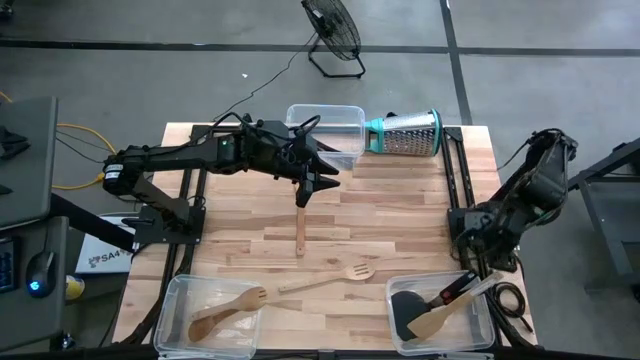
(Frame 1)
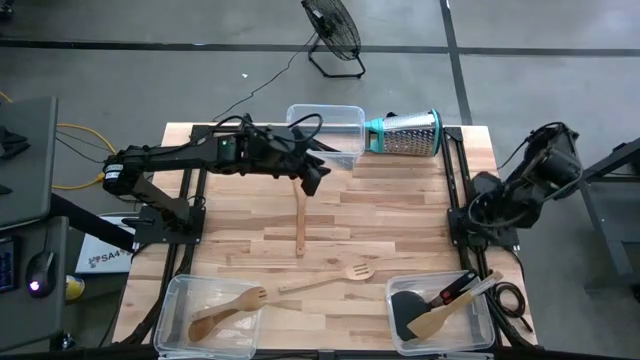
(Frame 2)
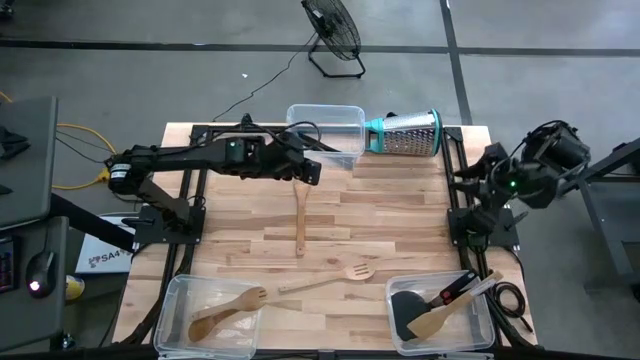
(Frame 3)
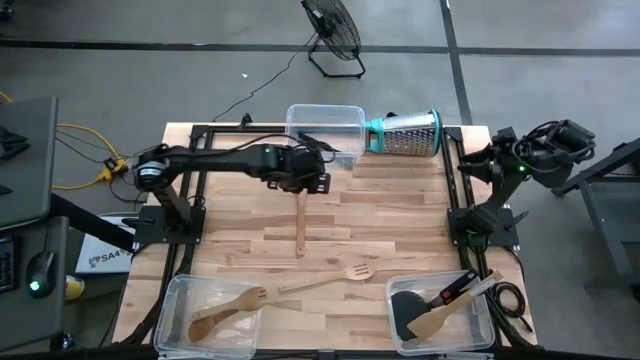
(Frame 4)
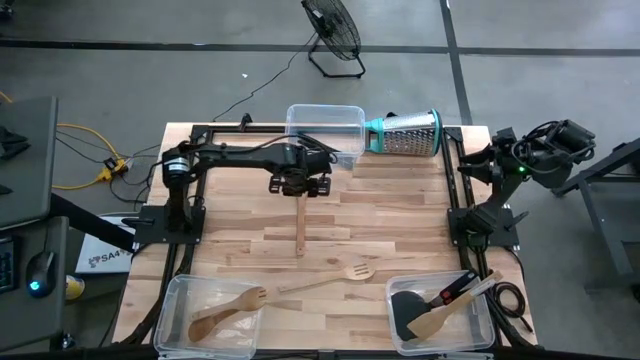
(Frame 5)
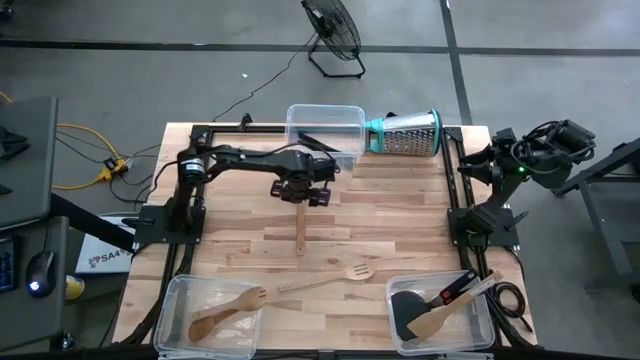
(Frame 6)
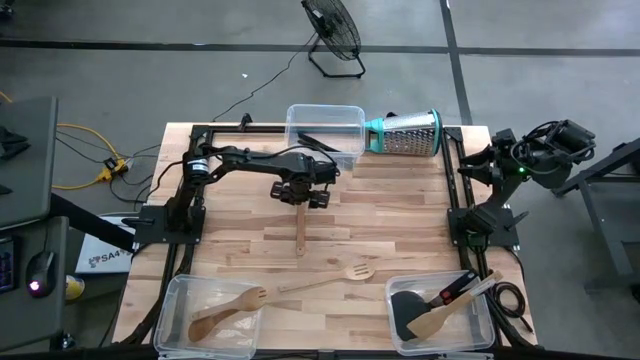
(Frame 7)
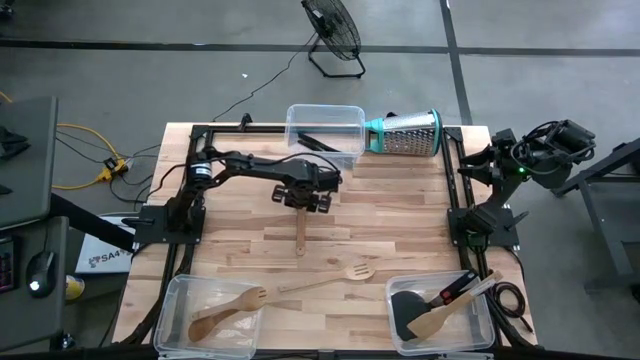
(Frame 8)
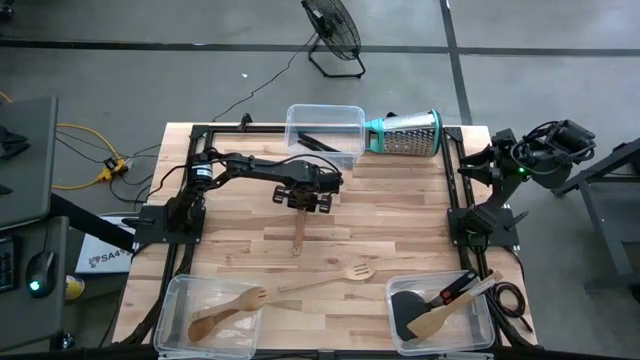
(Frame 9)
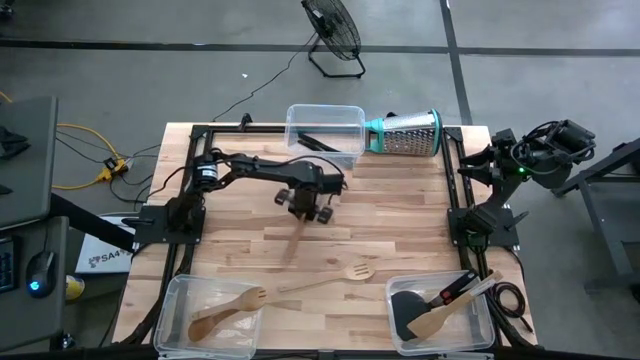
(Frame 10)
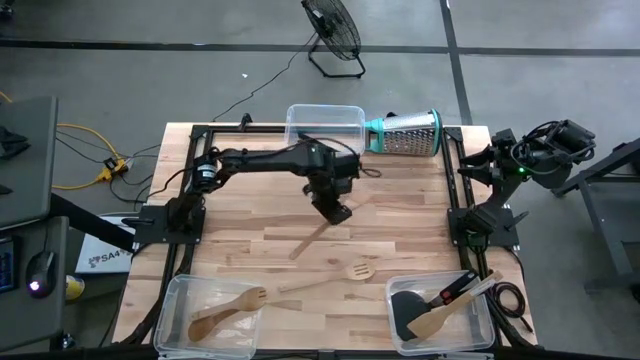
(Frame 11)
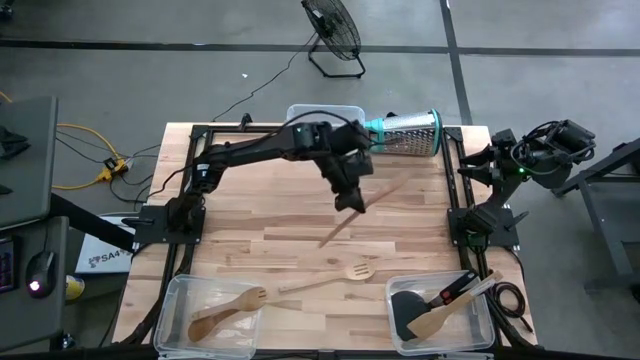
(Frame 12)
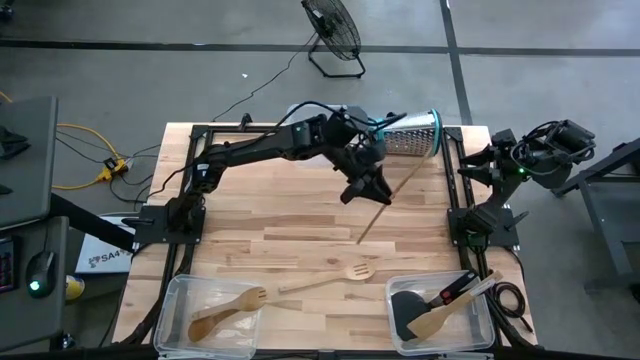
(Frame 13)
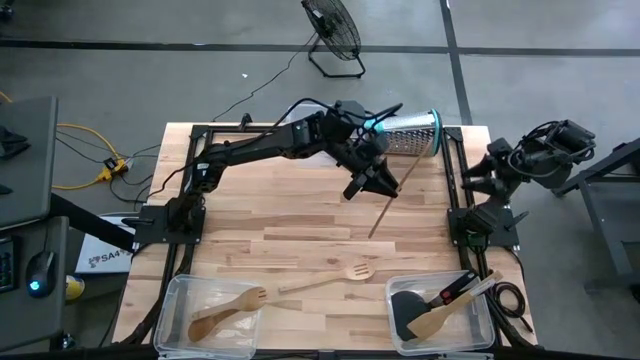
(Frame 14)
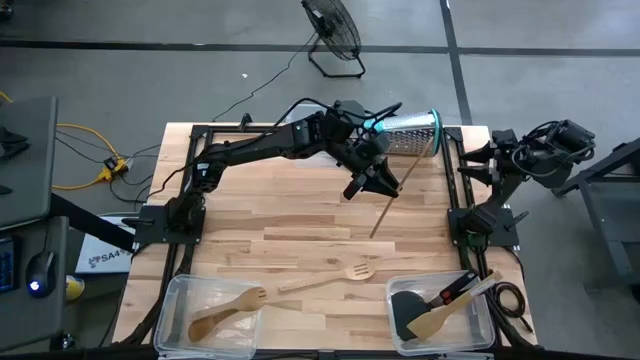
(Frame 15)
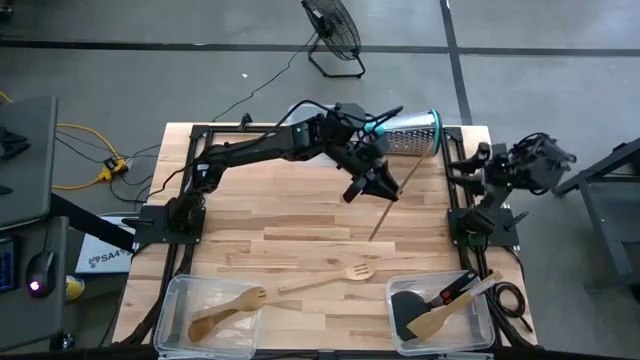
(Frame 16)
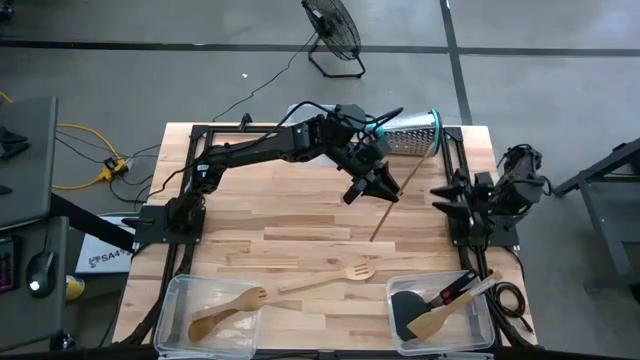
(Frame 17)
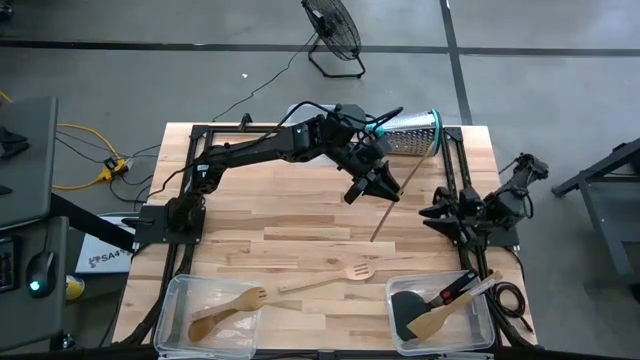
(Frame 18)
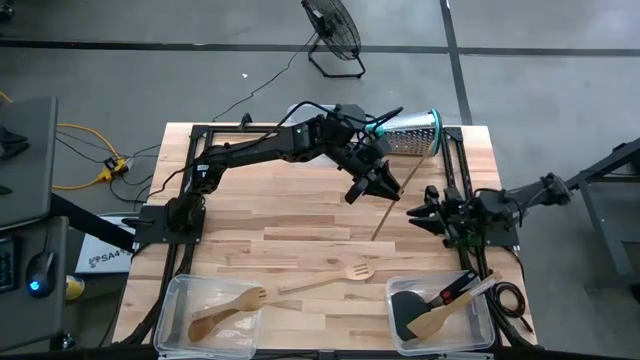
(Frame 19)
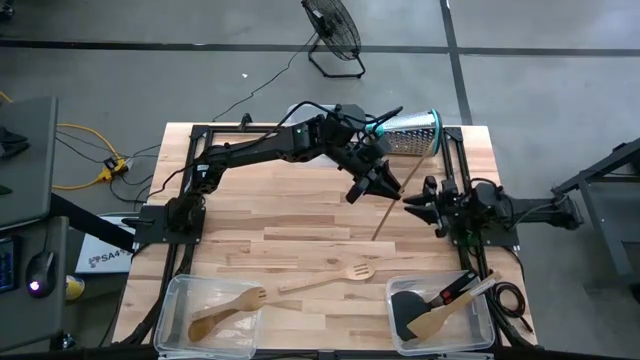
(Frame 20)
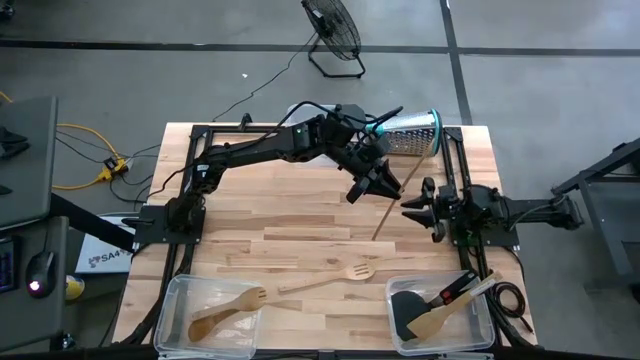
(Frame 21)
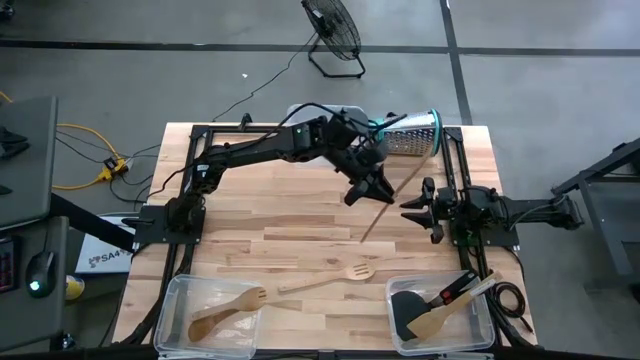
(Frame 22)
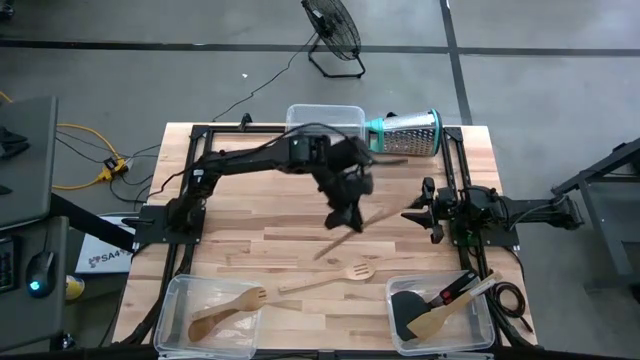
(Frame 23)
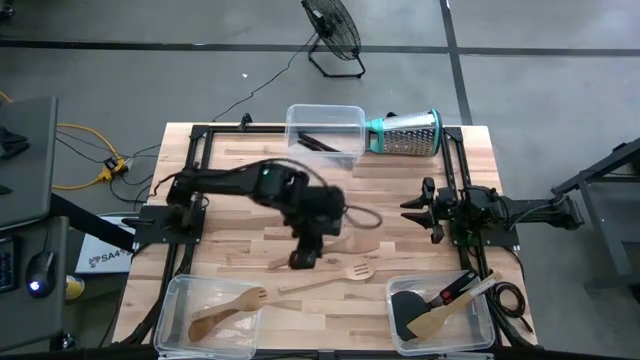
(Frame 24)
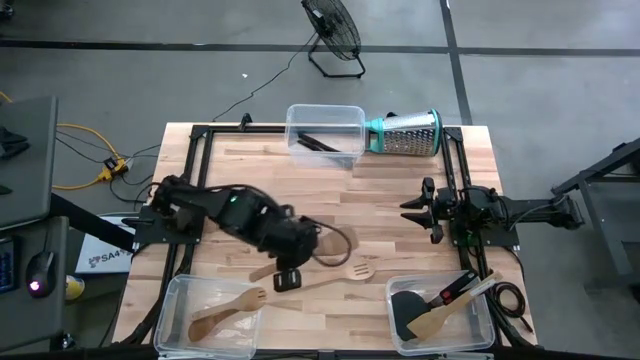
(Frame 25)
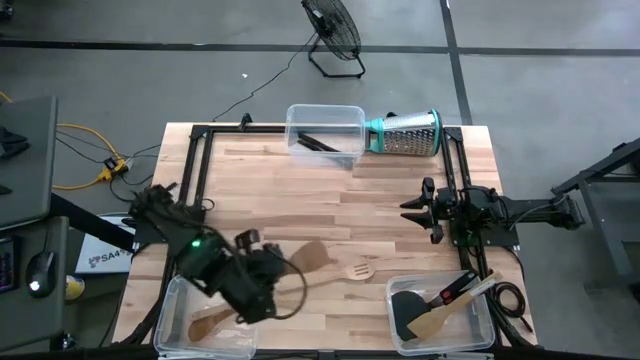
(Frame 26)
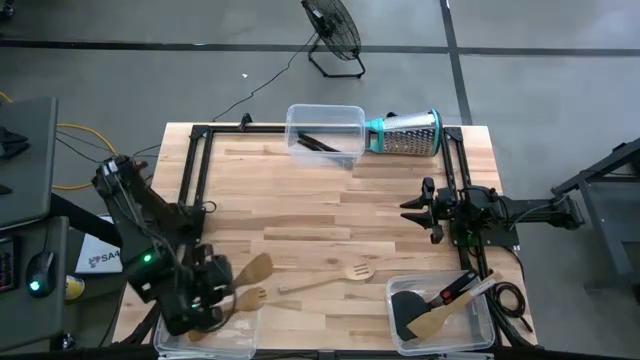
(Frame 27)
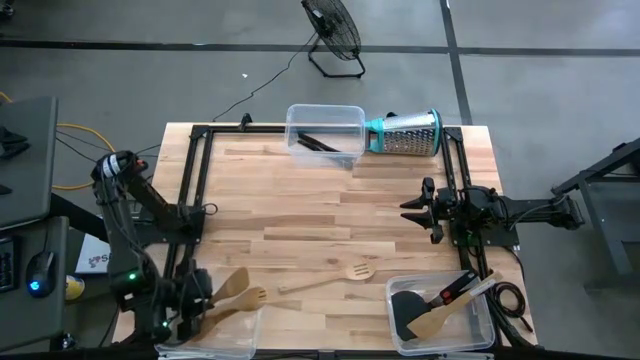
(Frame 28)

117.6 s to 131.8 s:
Task: Pick & Place Kitchen Items
Put the brown serving spoon into the bottom left transparent bin

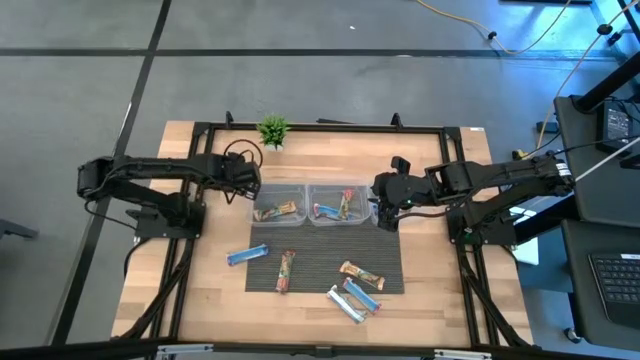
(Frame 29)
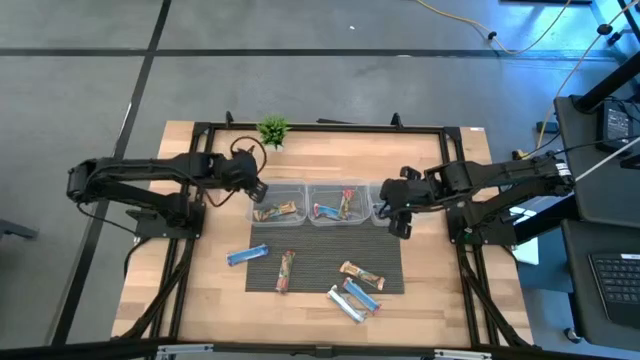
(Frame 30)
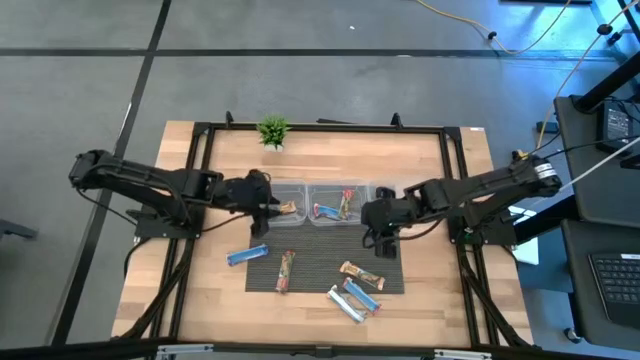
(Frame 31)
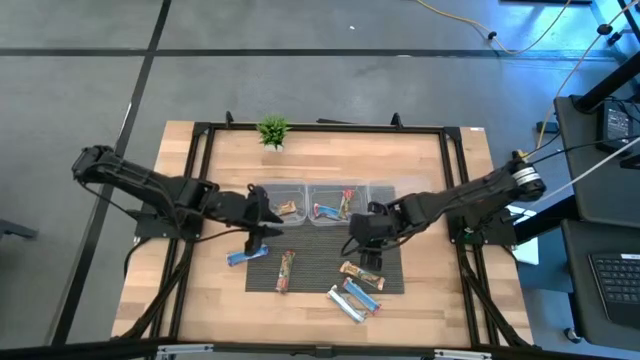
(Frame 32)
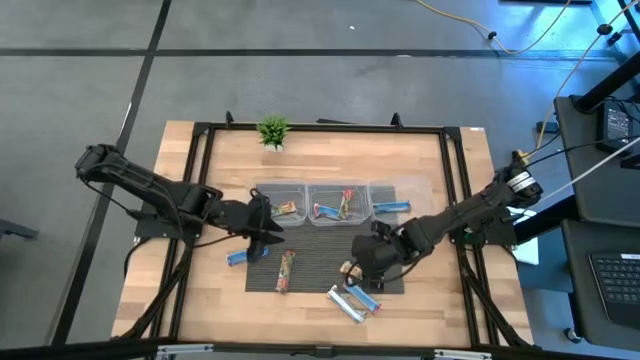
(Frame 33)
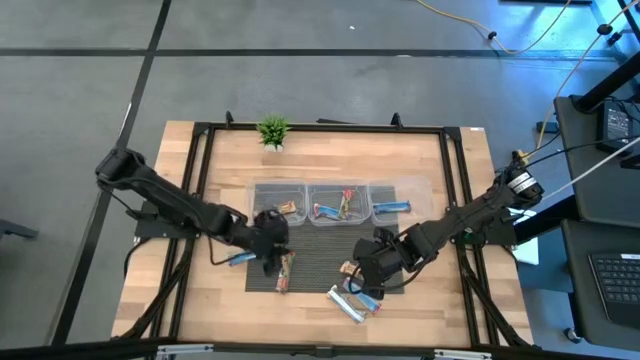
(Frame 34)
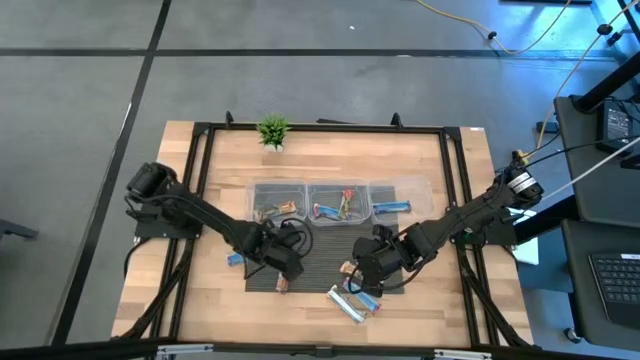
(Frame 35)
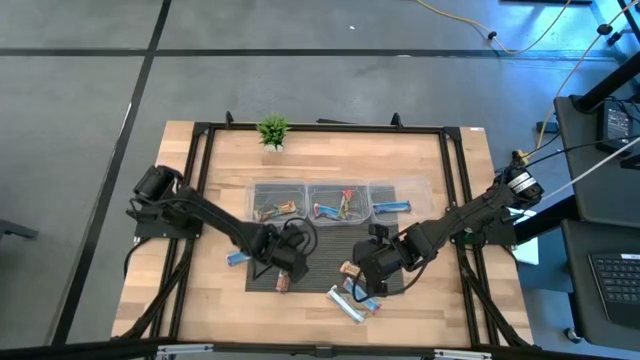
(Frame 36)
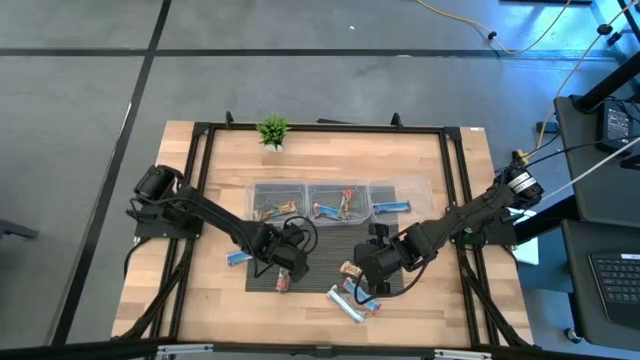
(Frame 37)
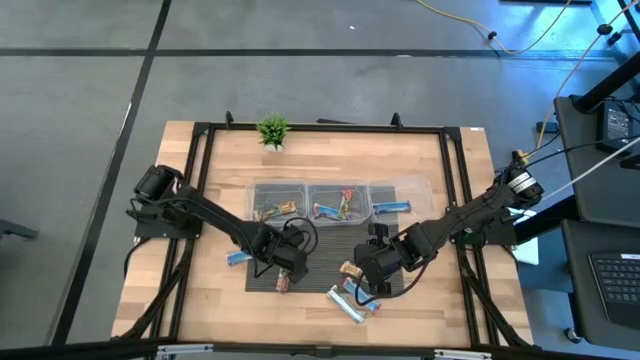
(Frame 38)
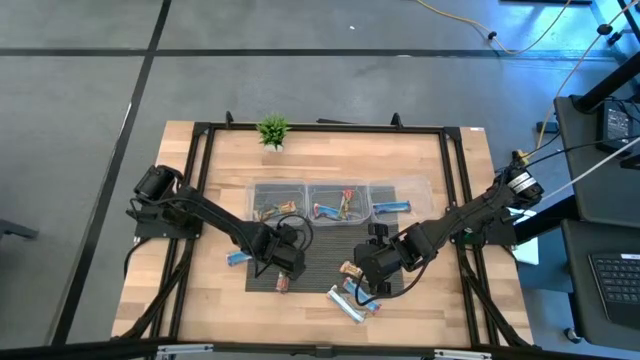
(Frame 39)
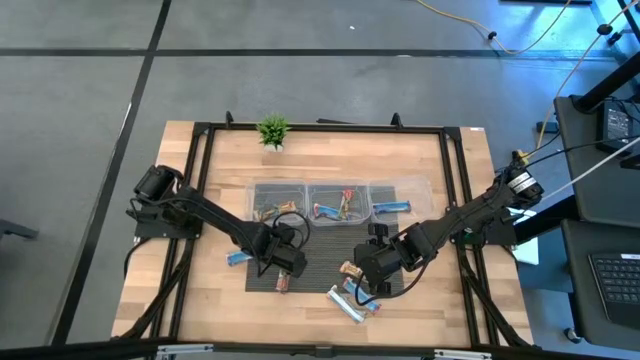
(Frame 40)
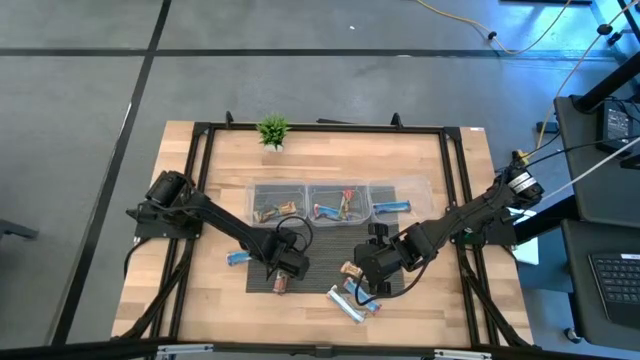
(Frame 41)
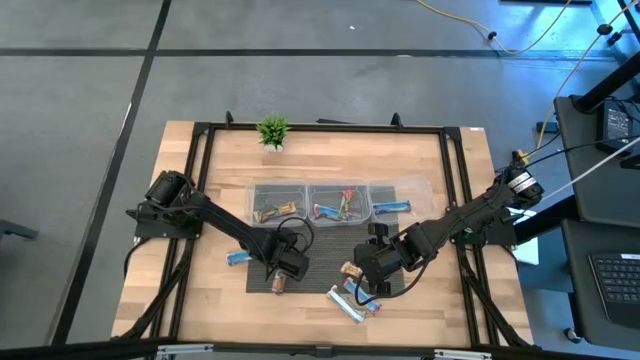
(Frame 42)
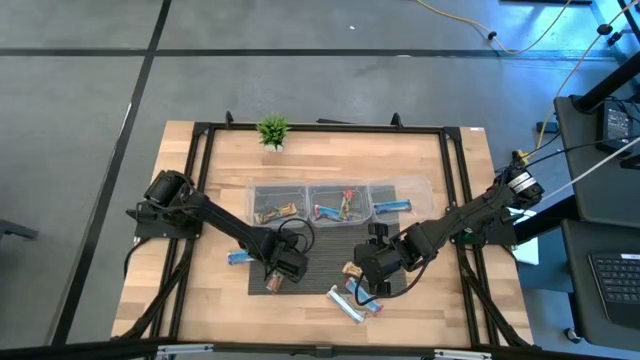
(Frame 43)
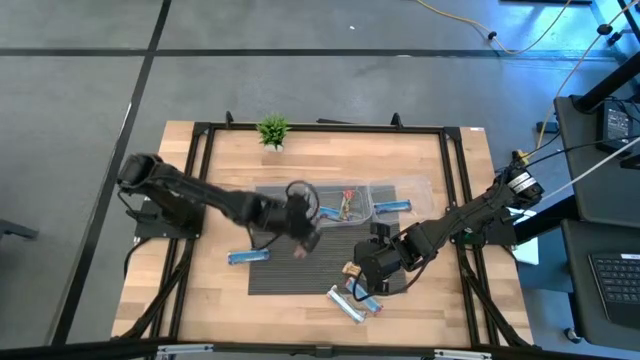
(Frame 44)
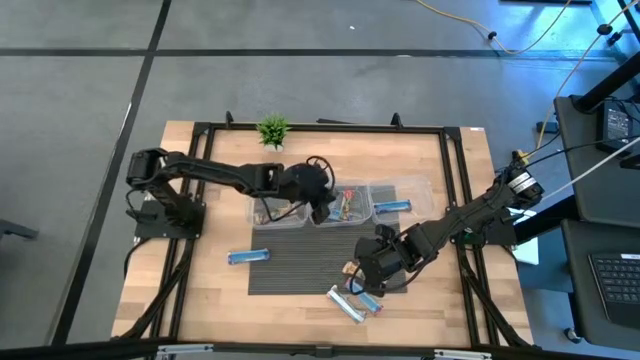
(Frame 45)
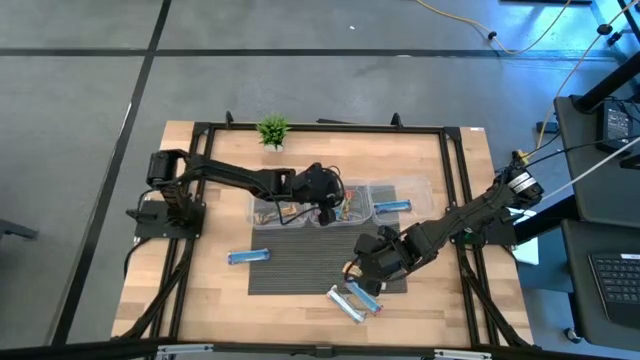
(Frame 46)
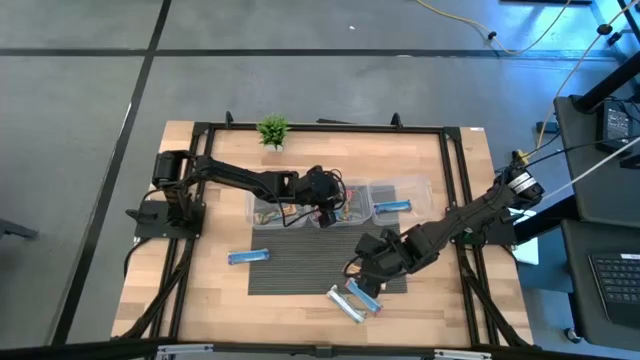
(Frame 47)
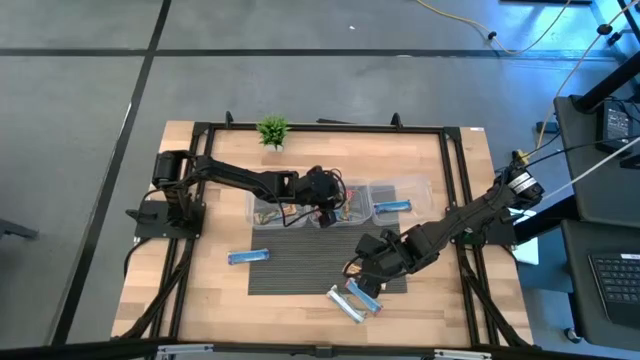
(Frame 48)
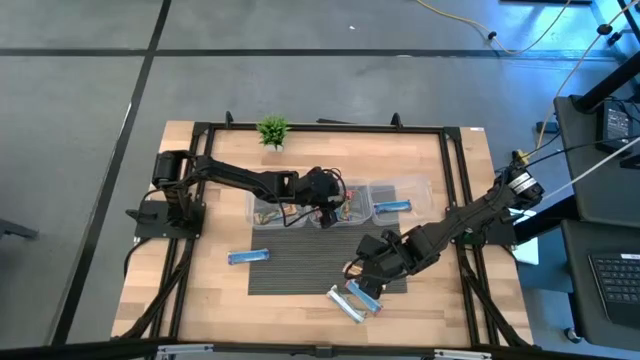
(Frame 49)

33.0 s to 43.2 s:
Task: Pick and place Granola Bars by type
Put the red granola bar into the center transparent bin
